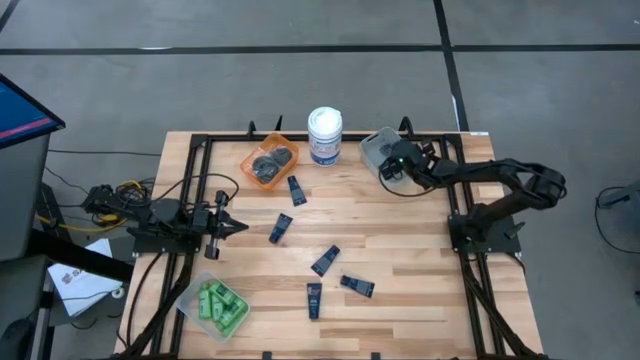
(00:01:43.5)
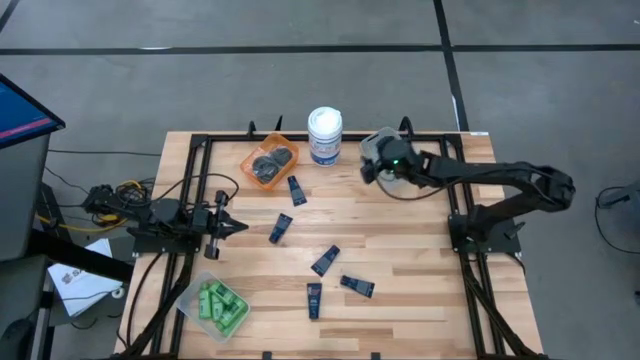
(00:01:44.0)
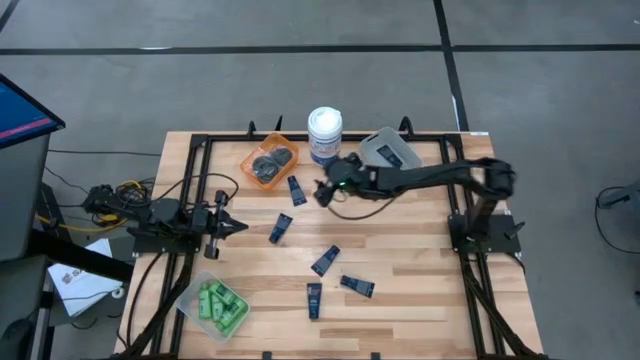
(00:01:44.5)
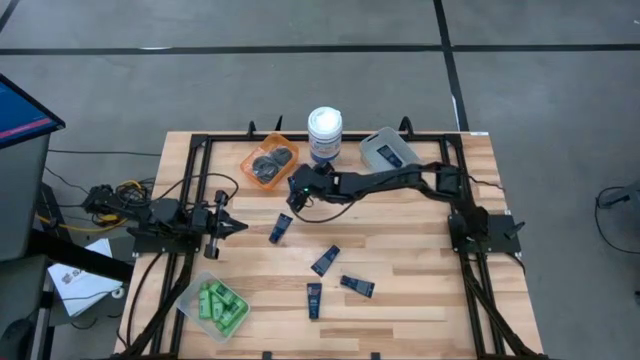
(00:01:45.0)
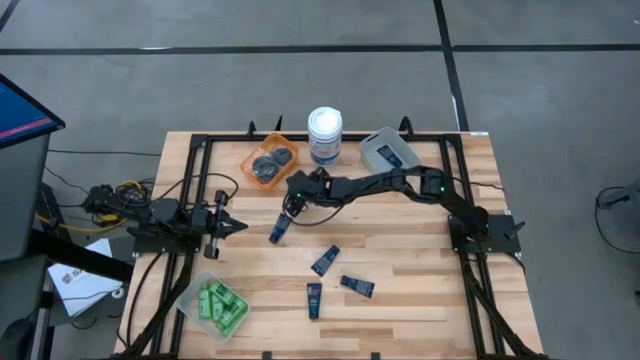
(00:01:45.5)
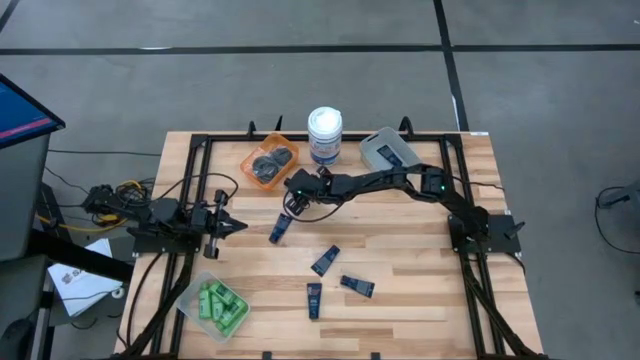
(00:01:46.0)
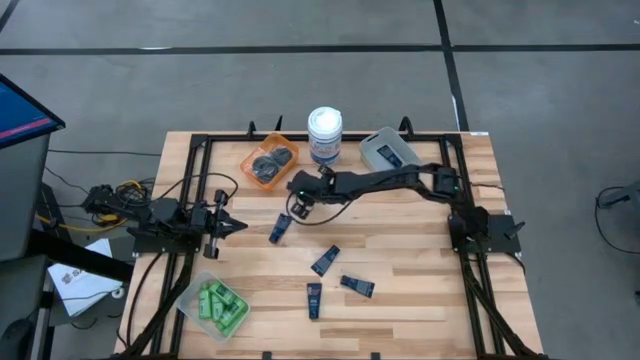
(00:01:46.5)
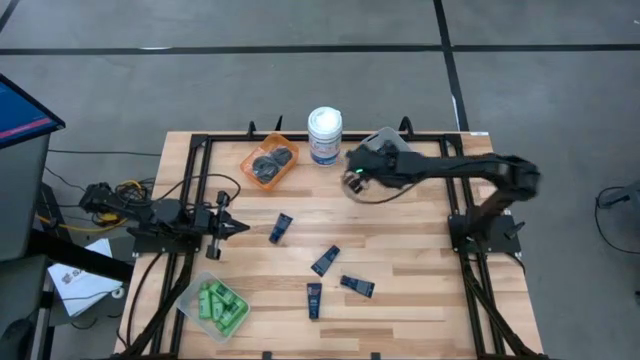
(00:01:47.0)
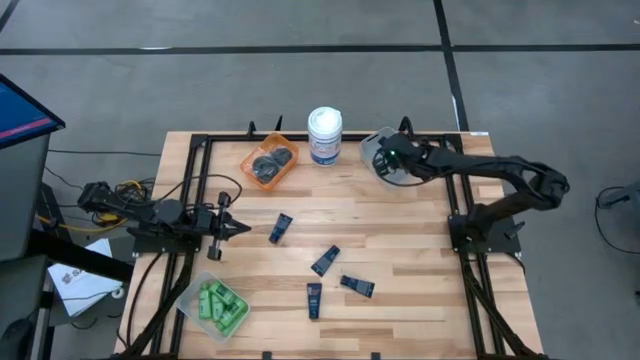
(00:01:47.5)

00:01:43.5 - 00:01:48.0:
Task: Pick & Place Travel size toiletries
Put the shaving cream into the gray bin

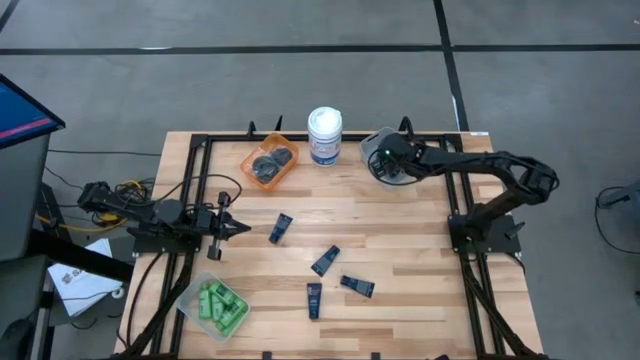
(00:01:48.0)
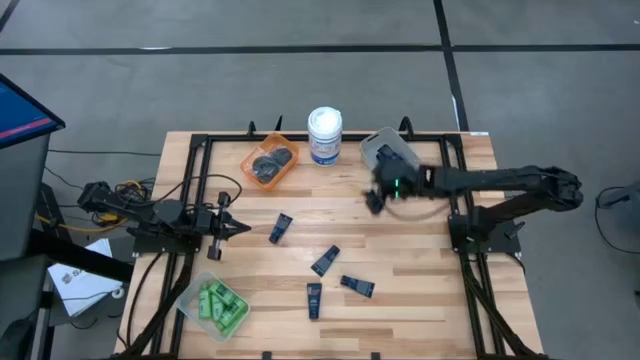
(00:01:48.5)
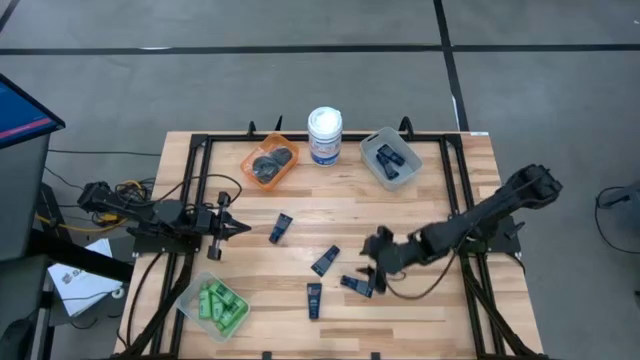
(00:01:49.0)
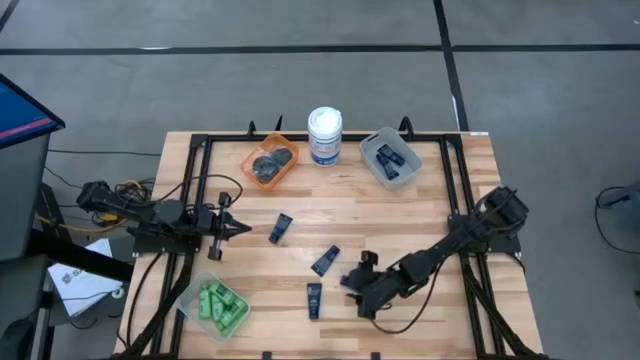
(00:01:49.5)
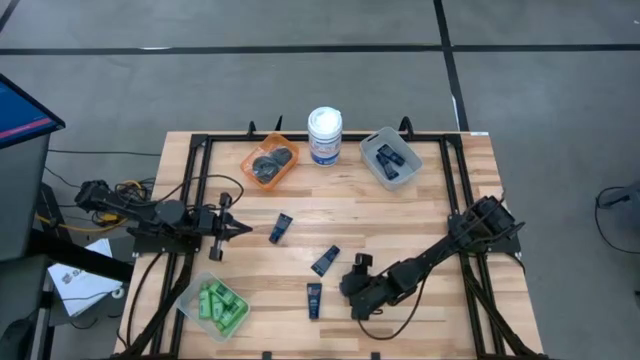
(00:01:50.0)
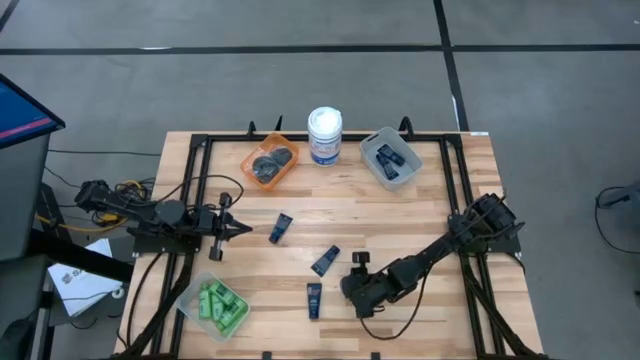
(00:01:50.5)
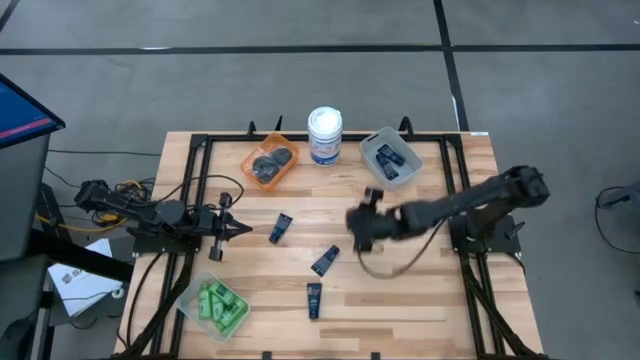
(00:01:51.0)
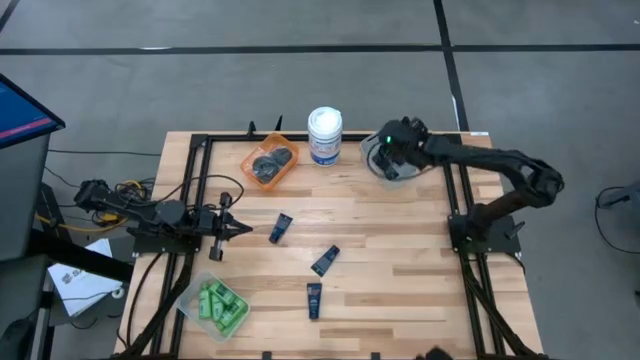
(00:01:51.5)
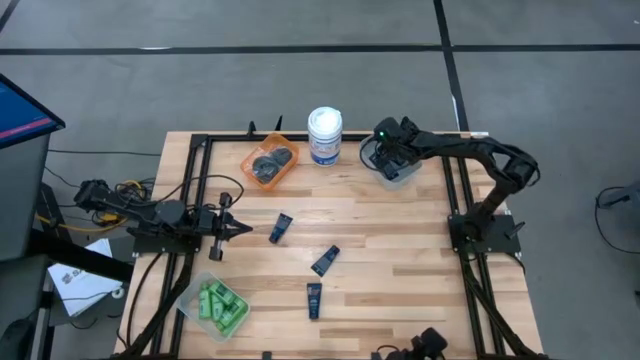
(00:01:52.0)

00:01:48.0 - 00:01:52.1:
Put the shaving cream into the gray bin

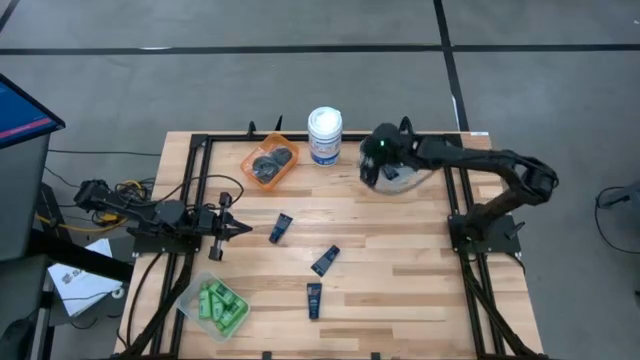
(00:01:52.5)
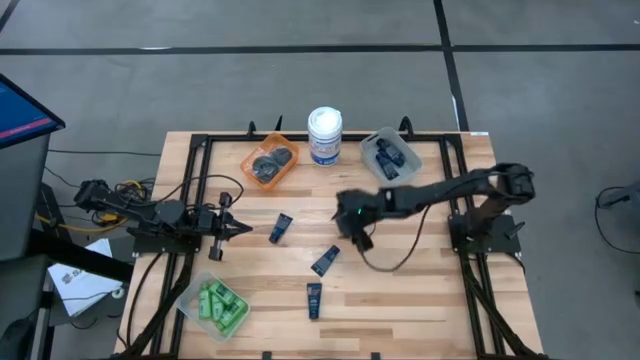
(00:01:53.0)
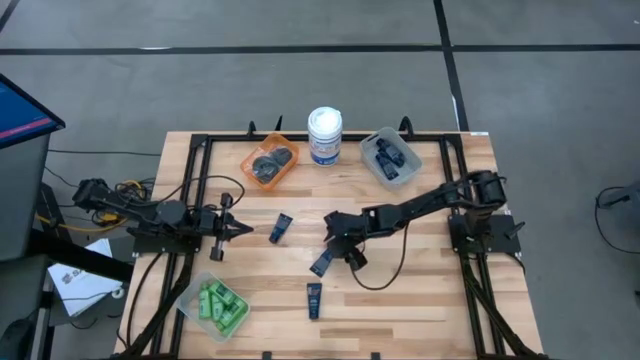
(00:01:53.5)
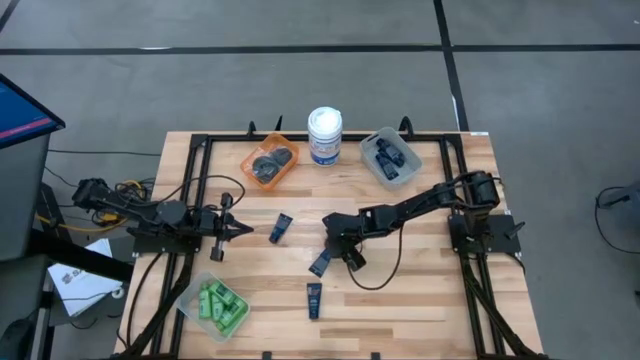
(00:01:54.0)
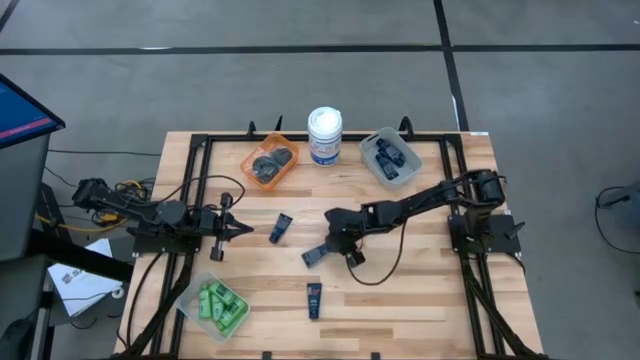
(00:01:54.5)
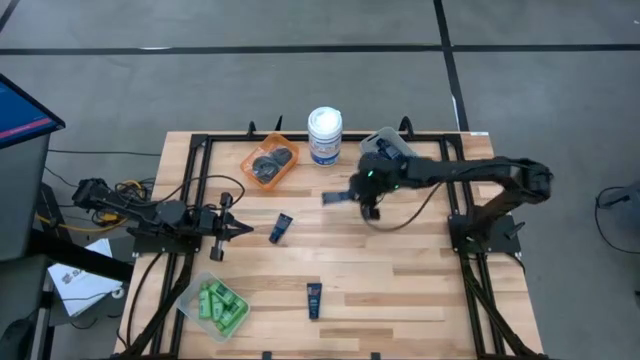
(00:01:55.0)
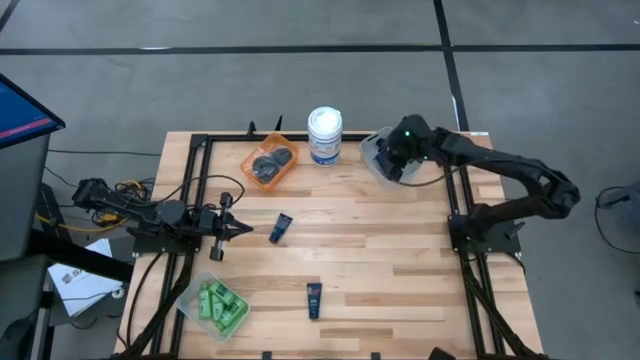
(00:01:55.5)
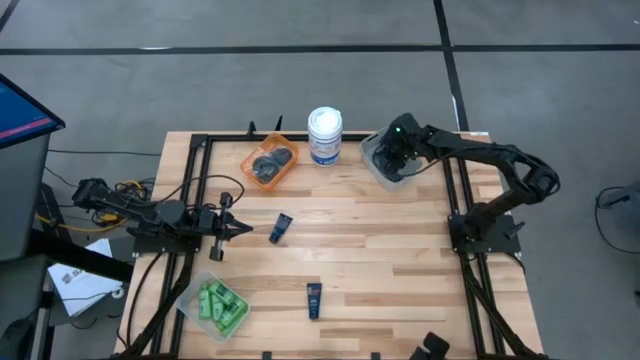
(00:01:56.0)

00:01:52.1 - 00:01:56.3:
Put the shaving cream into the gray bin

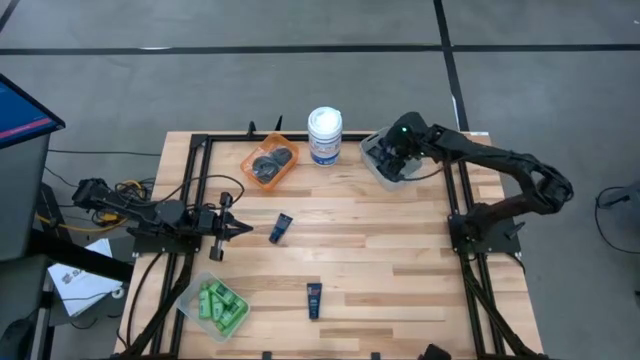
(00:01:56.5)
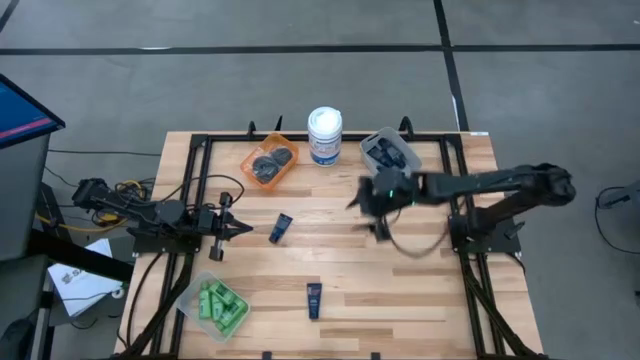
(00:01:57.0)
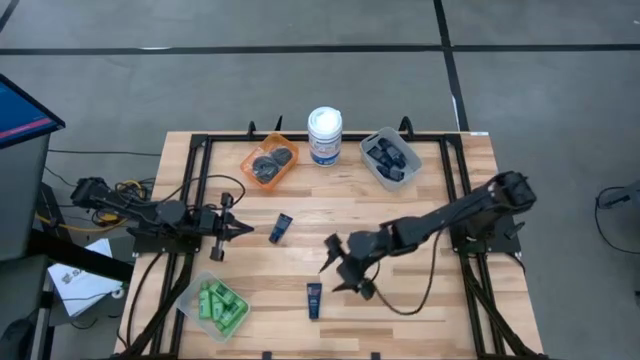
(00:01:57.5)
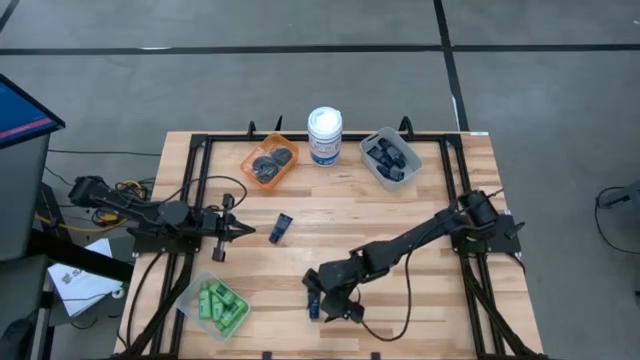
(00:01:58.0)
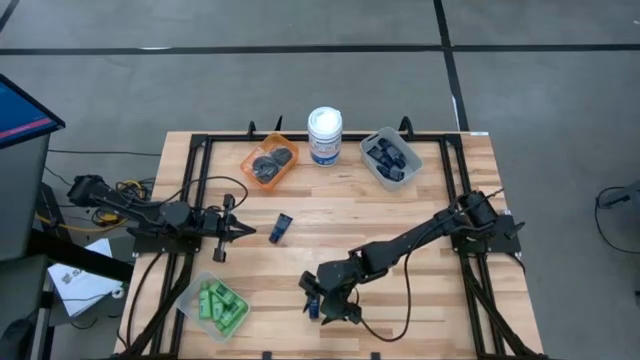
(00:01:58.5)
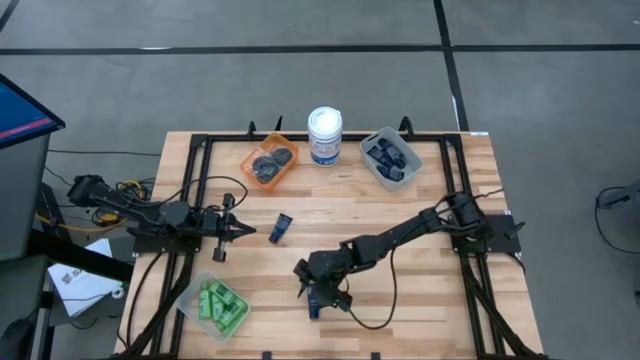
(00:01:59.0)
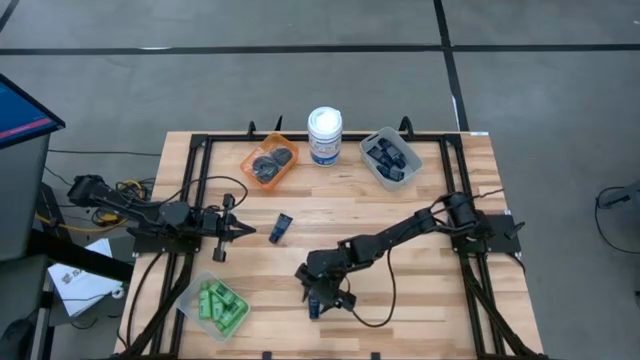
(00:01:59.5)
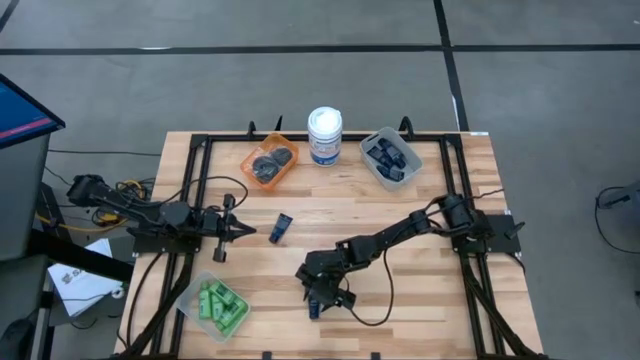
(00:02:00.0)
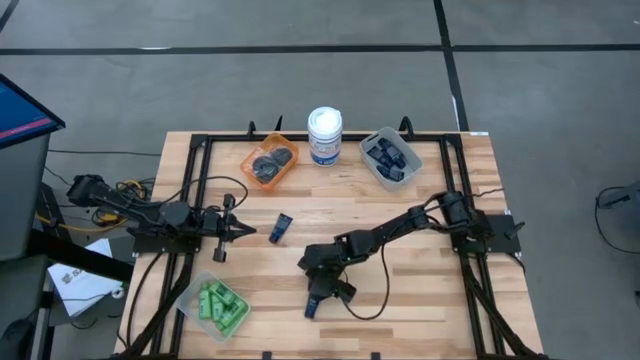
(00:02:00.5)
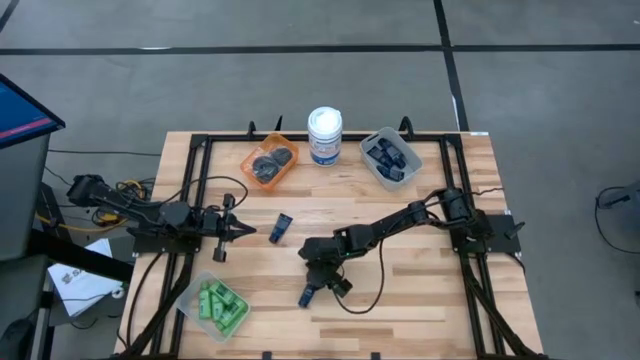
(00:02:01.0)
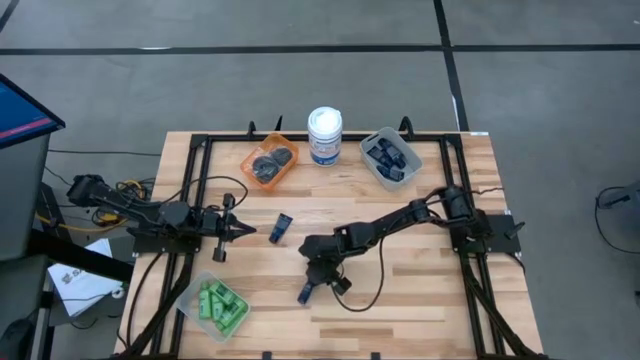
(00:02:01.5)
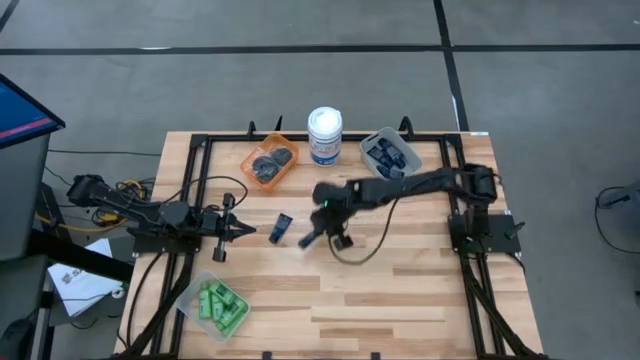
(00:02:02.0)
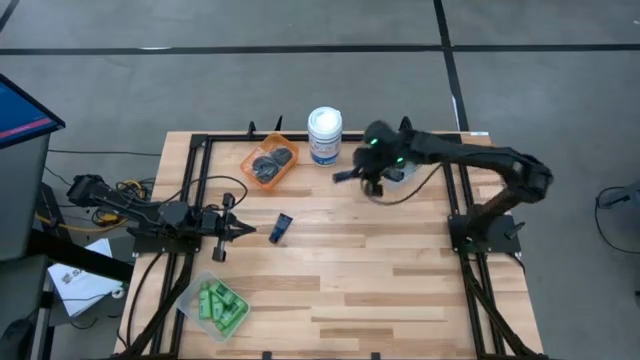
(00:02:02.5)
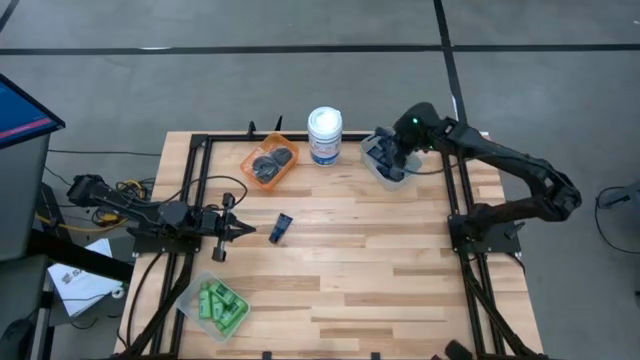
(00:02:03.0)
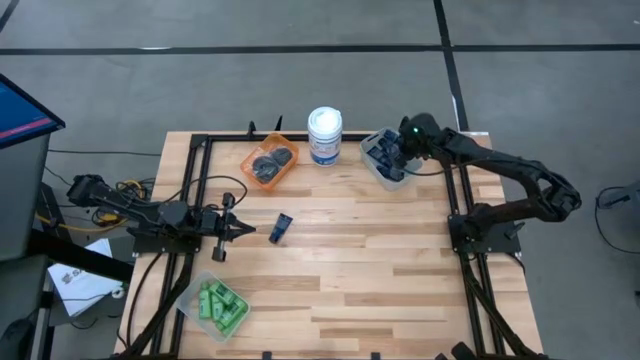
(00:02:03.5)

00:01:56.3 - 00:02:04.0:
Put the shaving cream into the gray bin
